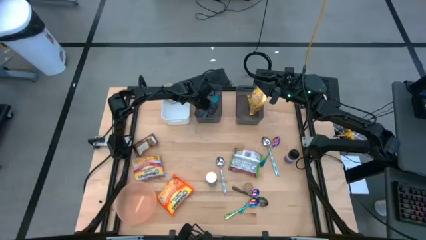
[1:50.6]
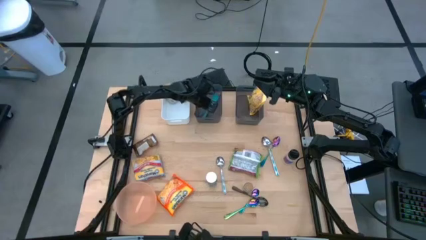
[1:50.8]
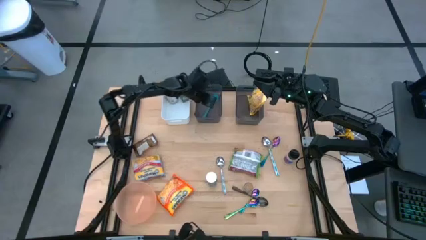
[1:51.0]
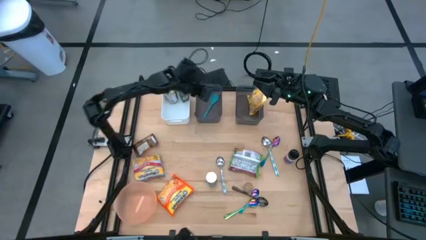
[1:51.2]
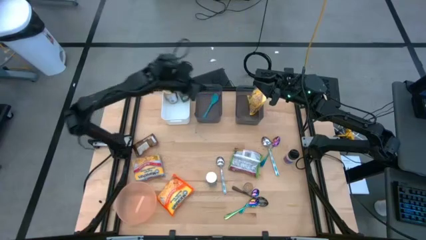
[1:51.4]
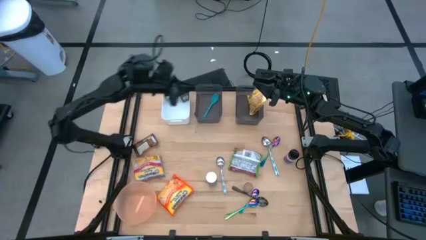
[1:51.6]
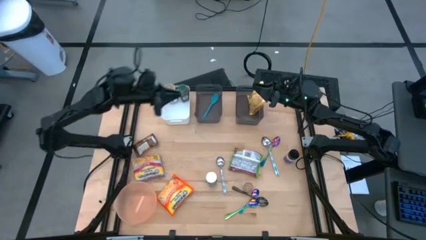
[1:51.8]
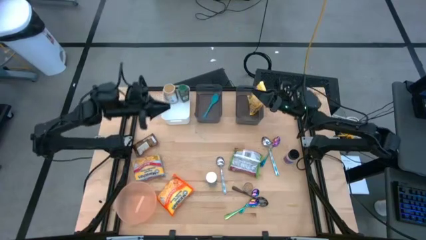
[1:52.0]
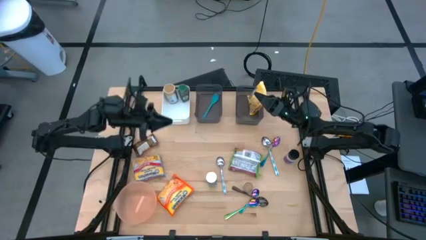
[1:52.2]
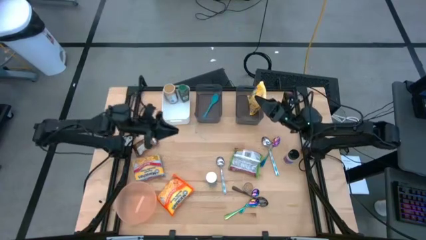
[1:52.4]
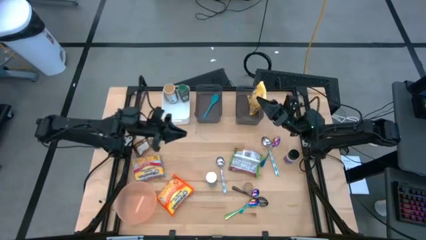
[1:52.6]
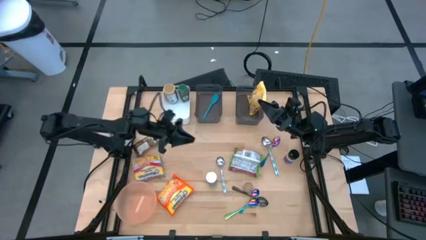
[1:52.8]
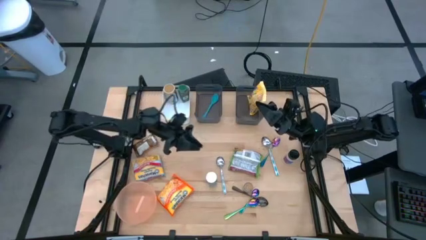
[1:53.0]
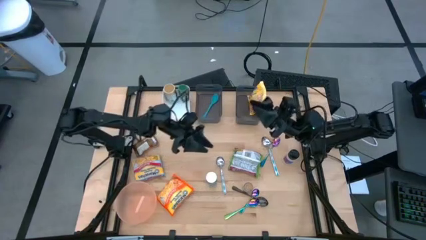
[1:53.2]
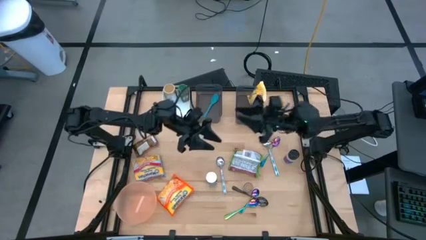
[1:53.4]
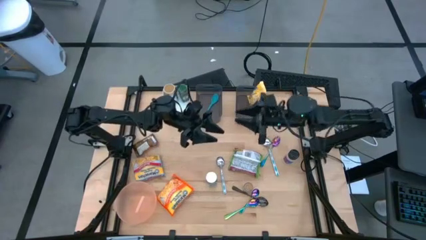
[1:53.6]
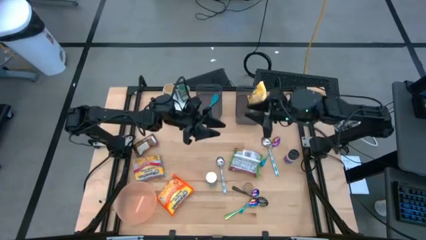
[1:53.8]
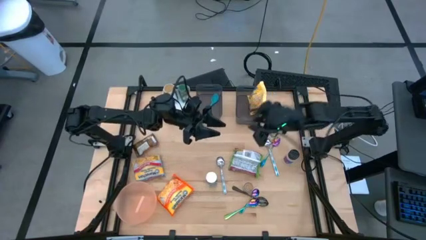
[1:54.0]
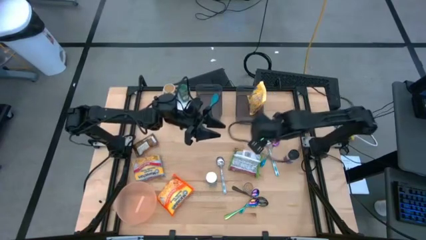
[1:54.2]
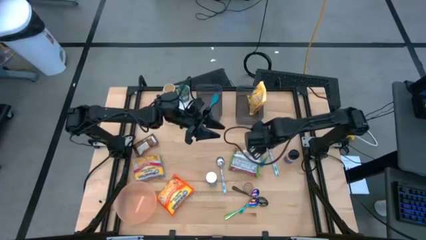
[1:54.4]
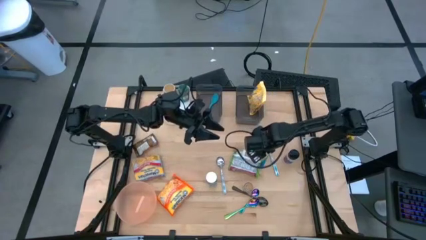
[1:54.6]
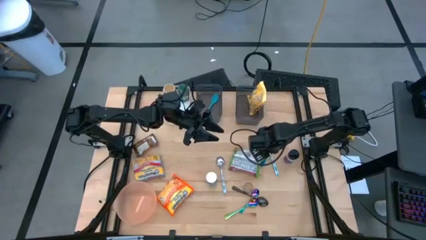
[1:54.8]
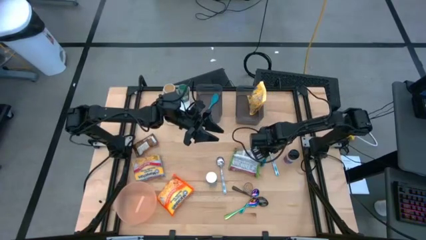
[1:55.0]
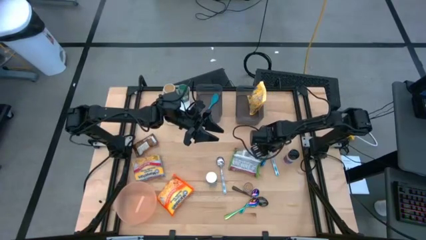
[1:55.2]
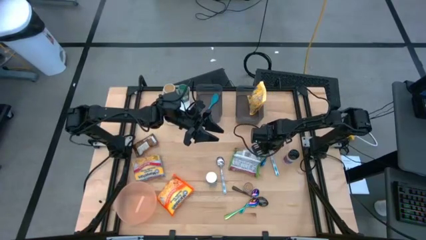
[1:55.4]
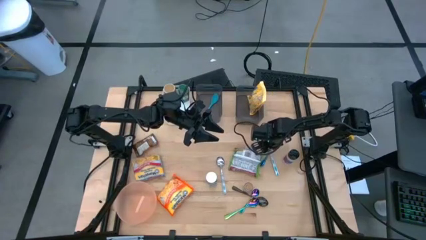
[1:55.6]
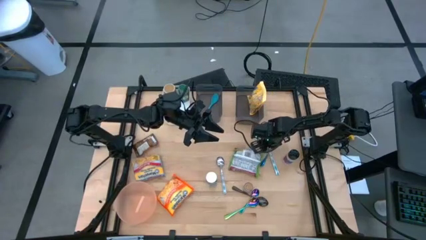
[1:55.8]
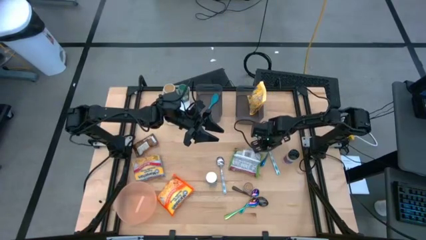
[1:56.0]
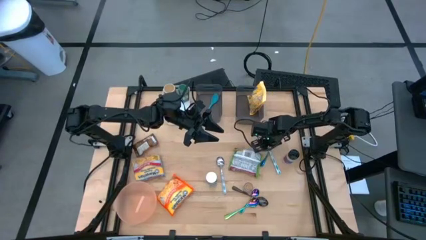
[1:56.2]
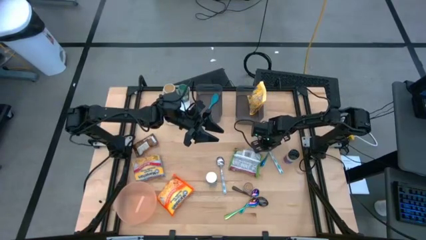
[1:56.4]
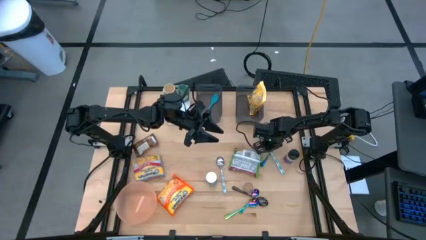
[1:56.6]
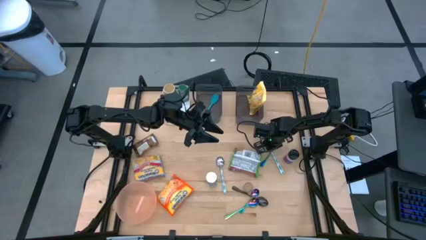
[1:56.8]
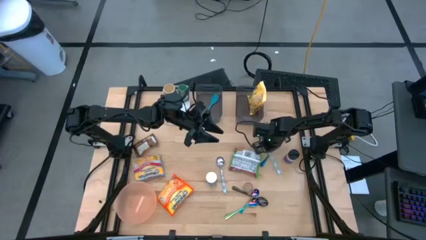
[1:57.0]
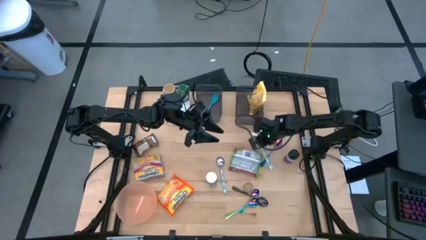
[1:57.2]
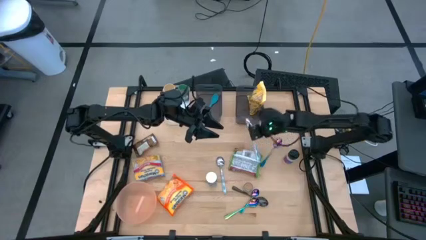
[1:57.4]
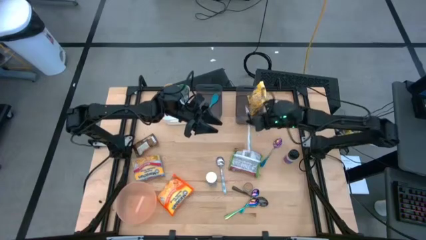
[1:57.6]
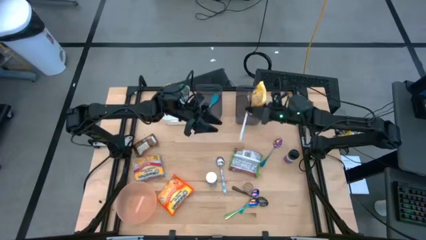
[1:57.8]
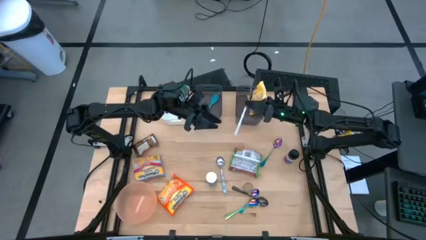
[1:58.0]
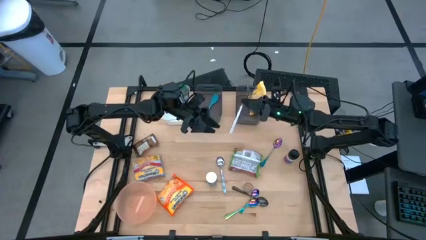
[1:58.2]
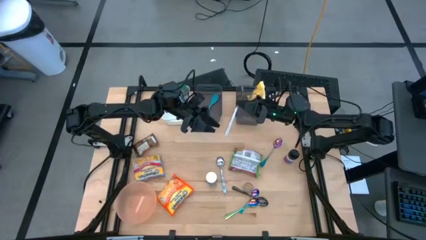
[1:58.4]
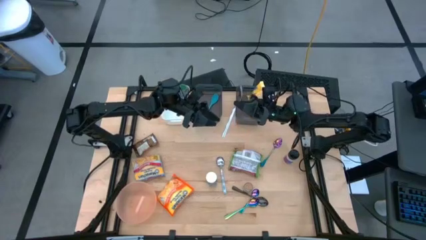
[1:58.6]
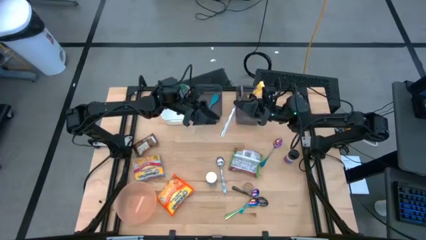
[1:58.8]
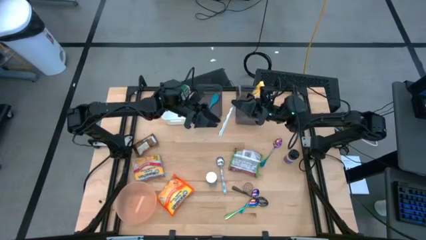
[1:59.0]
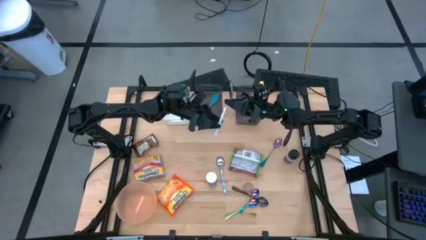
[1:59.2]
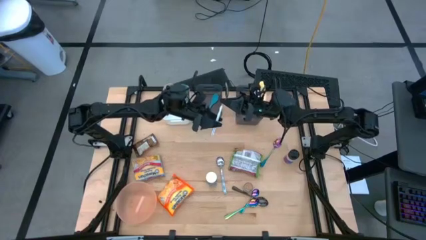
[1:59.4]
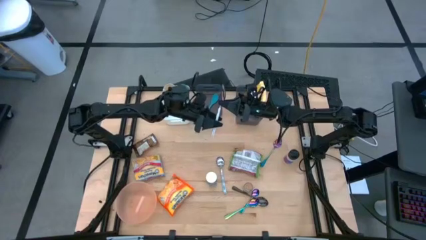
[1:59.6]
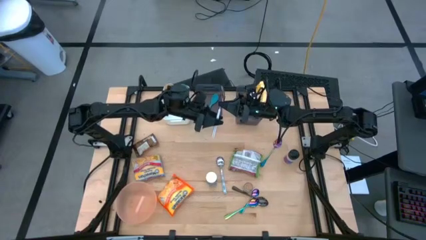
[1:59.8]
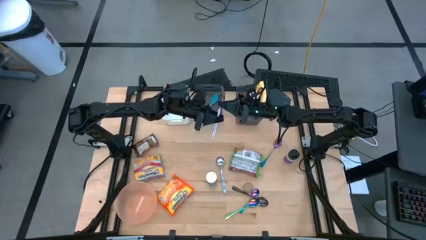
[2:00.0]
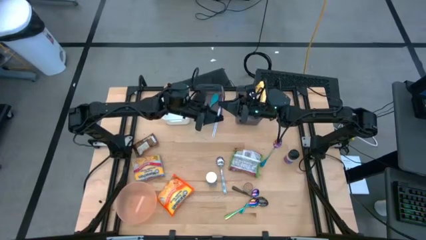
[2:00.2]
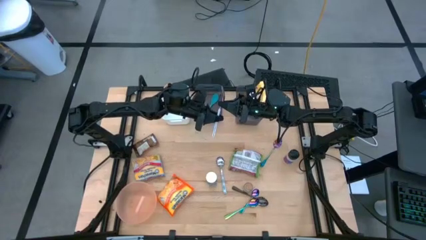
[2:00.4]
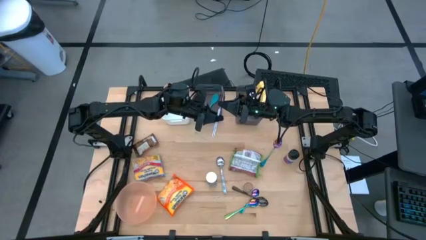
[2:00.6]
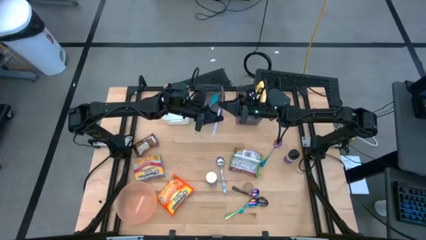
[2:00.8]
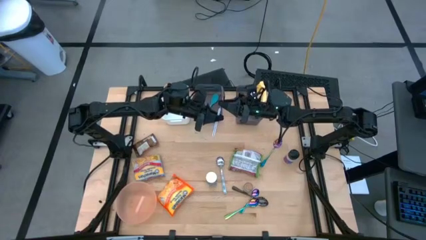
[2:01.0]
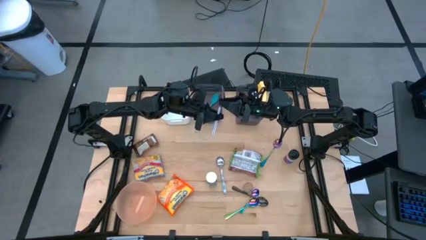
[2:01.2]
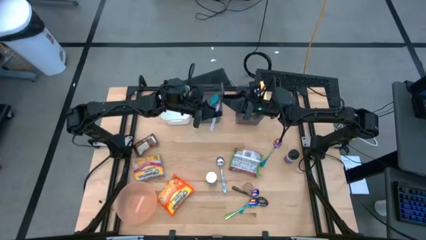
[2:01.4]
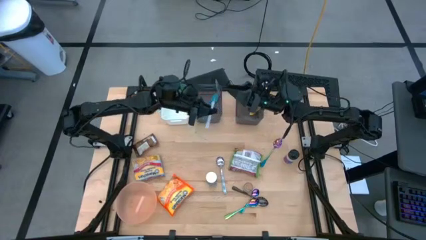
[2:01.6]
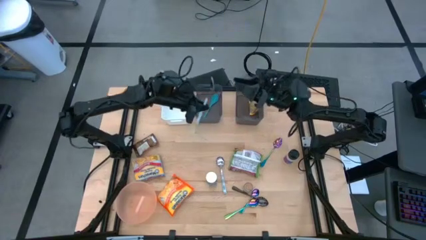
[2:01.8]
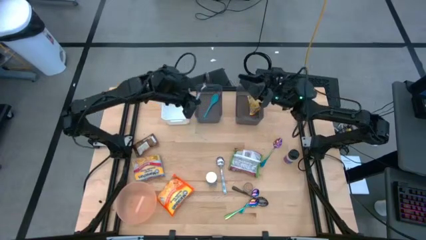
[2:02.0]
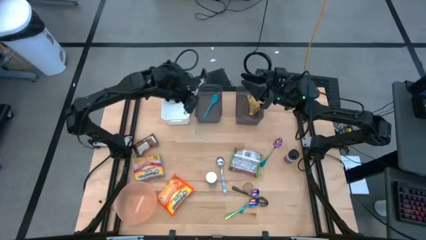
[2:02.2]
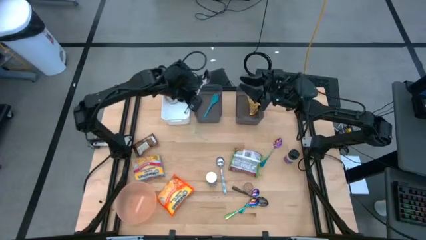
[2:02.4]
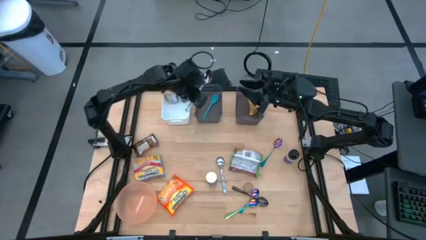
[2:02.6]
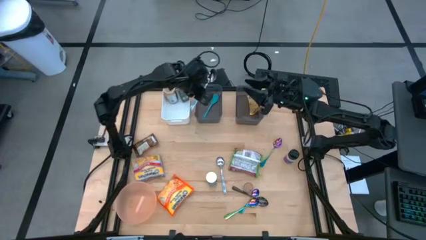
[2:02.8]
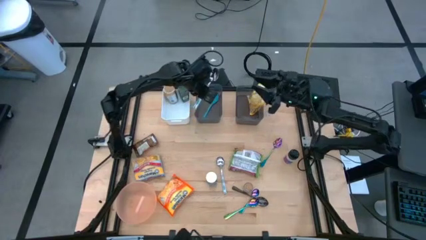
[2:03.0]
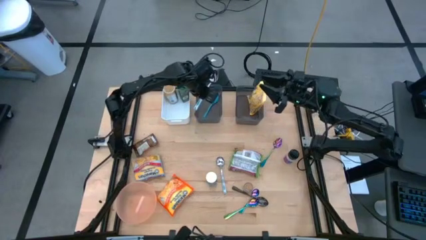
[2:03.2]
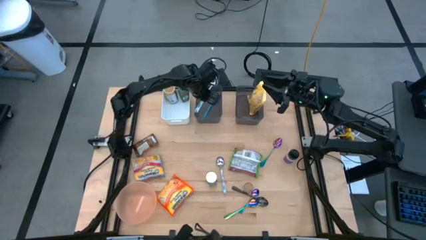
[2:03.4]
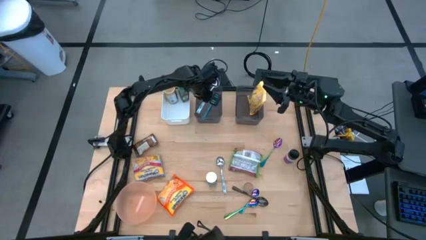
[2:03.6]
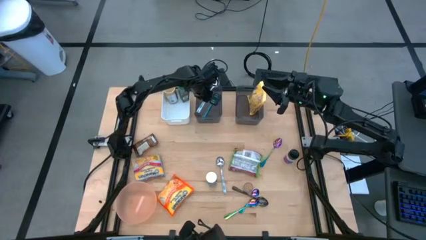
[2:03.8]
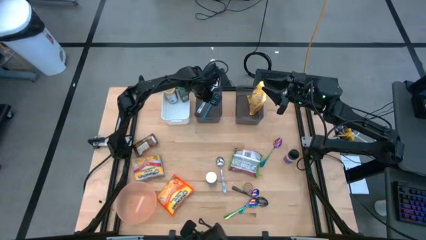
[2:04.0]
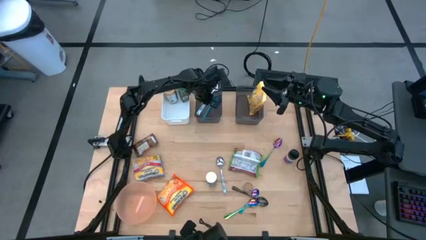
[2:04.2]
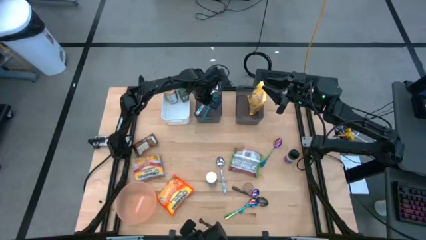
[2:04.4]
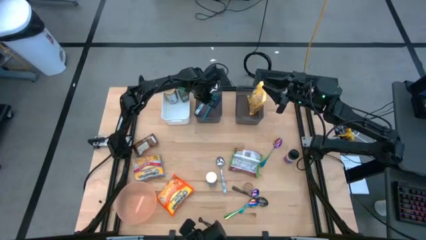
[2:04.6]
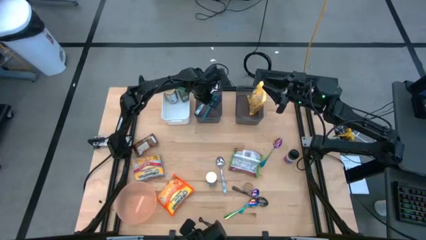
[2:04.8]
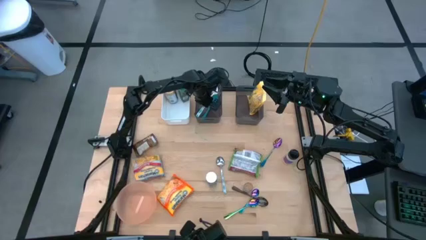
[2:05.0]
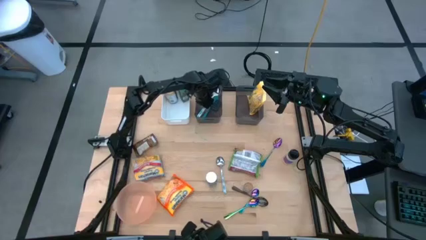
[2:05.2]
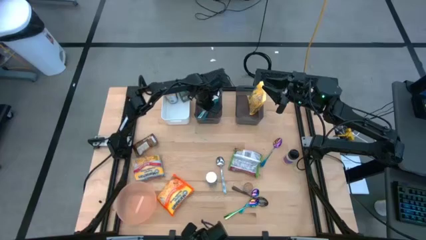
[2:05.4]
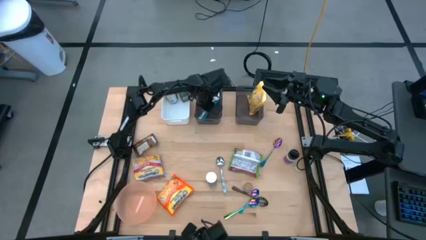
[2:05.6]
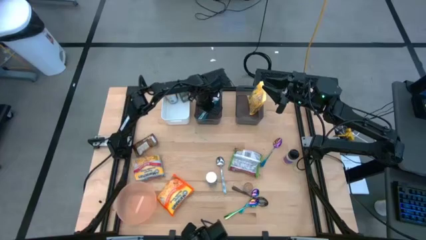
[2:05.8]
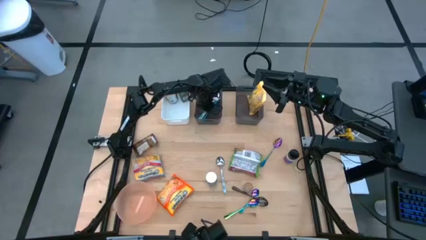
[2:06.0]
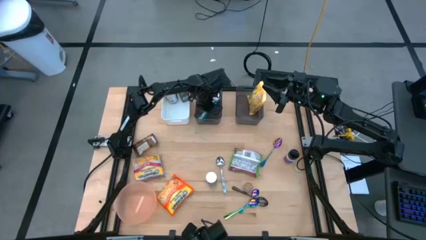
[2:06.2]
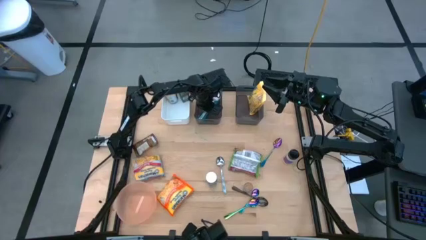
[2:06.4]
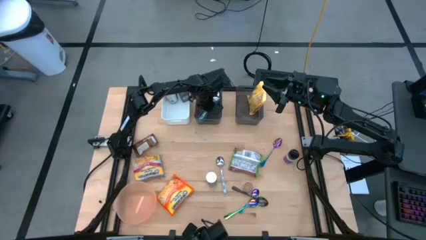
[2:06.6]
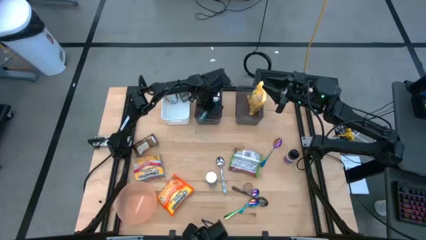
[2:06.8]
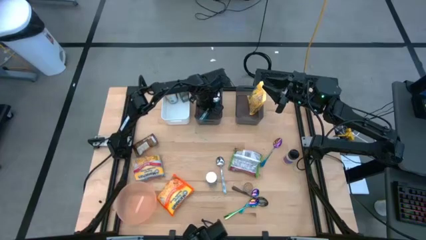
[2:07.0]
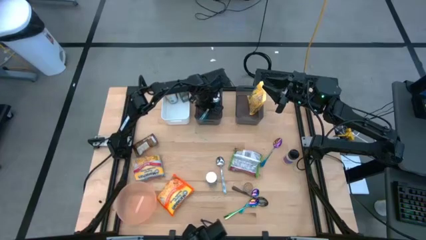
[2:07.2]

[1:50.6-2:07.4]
Task: Pick & Place Food Item
Put the right patterned spoon into the left black bin
